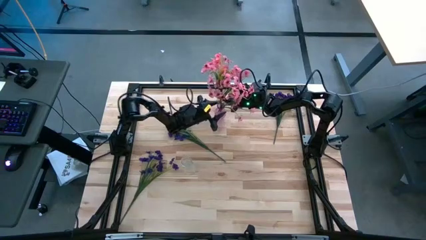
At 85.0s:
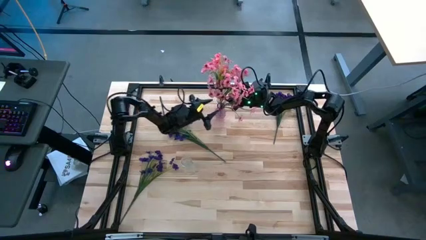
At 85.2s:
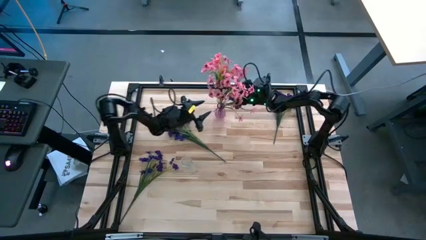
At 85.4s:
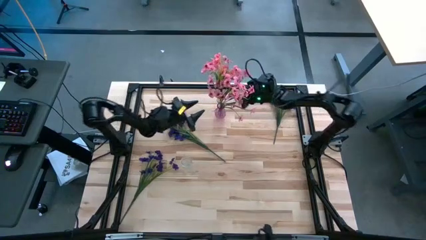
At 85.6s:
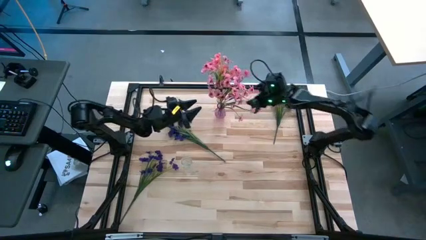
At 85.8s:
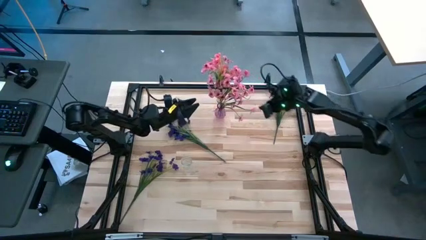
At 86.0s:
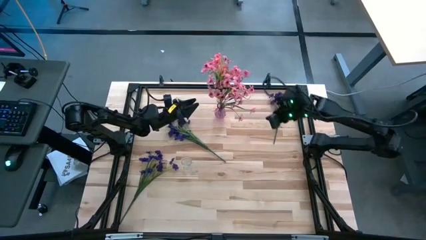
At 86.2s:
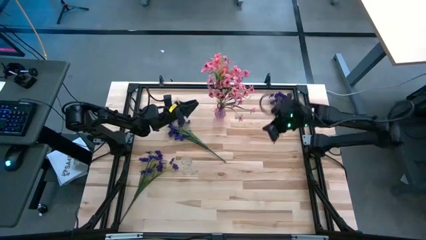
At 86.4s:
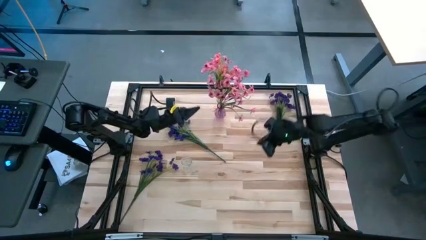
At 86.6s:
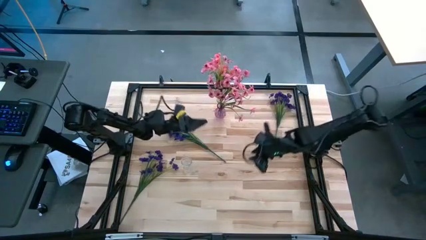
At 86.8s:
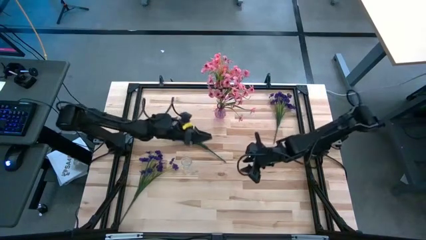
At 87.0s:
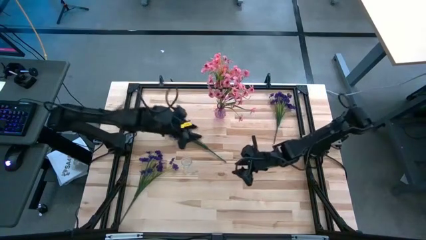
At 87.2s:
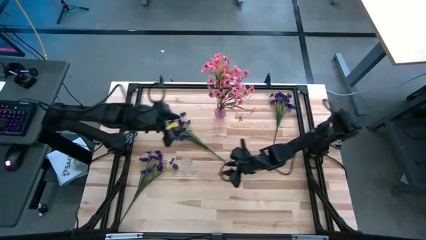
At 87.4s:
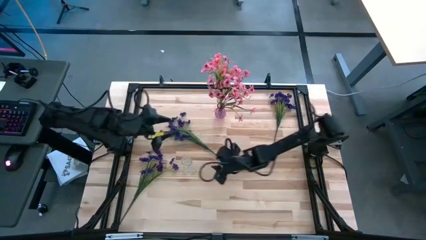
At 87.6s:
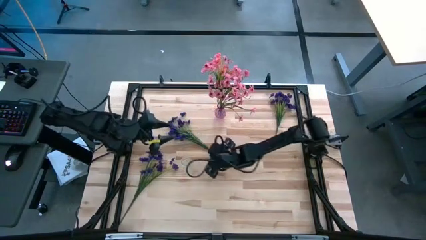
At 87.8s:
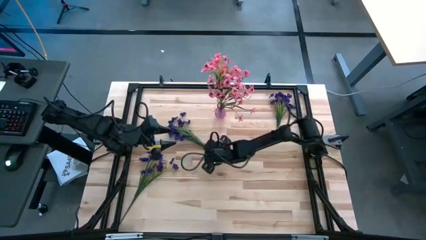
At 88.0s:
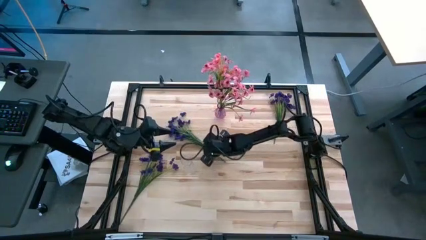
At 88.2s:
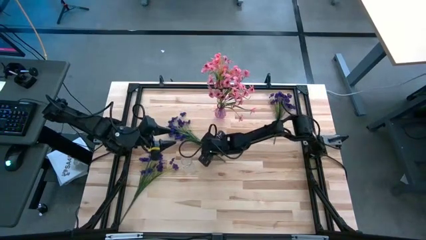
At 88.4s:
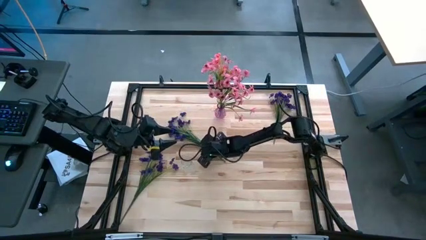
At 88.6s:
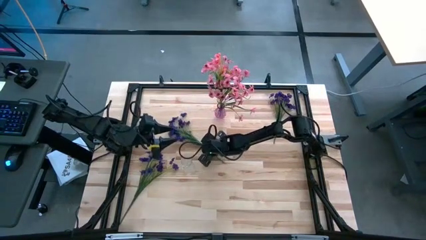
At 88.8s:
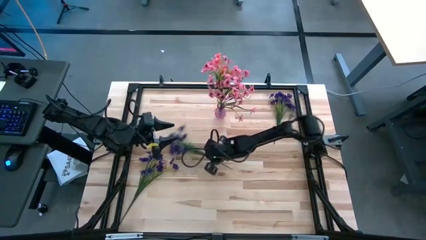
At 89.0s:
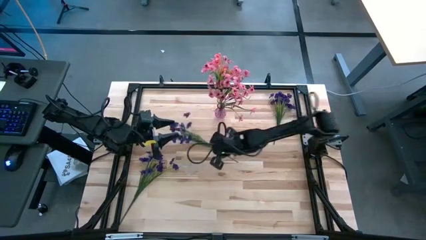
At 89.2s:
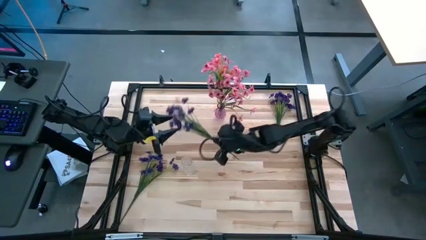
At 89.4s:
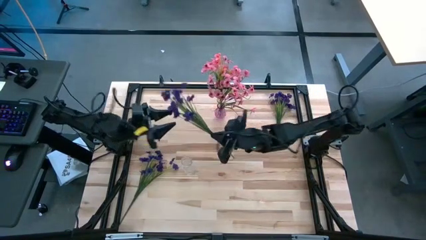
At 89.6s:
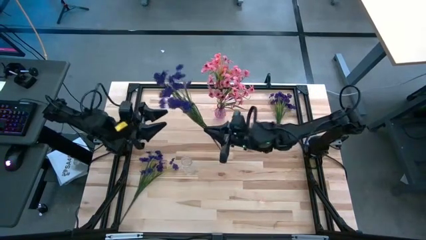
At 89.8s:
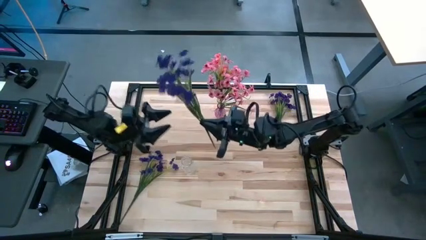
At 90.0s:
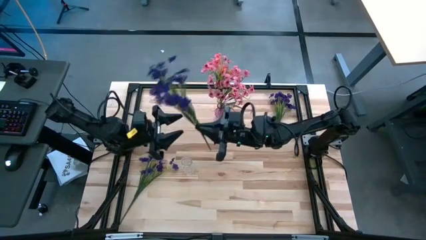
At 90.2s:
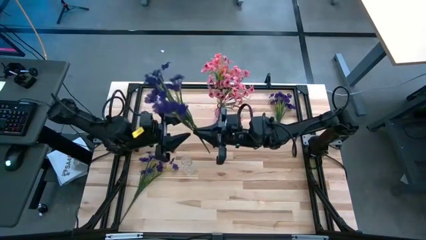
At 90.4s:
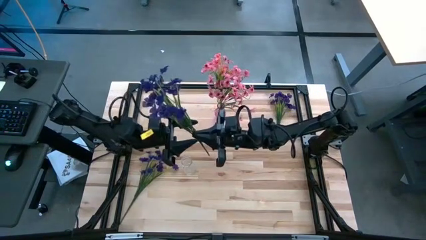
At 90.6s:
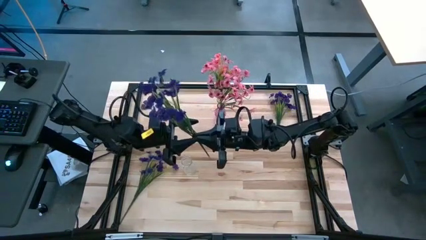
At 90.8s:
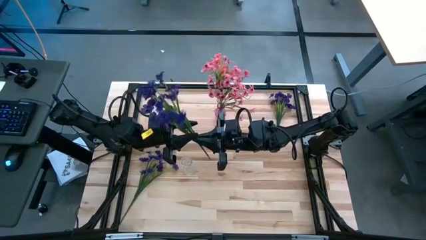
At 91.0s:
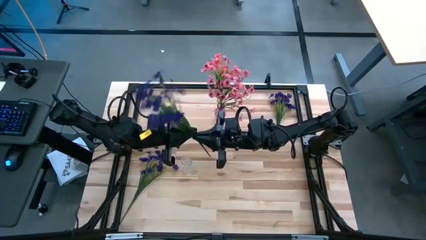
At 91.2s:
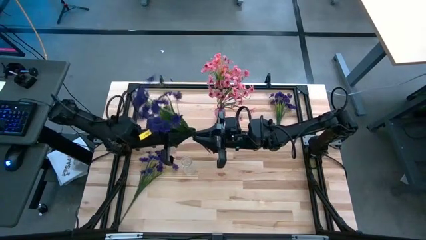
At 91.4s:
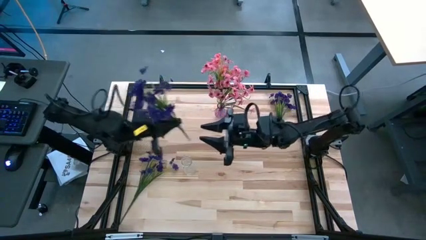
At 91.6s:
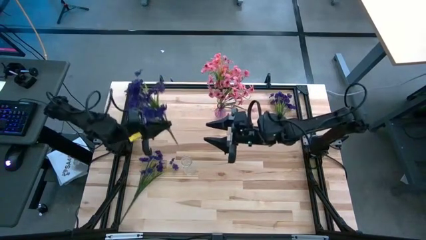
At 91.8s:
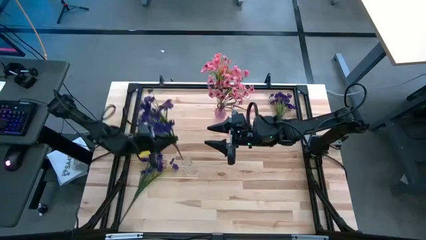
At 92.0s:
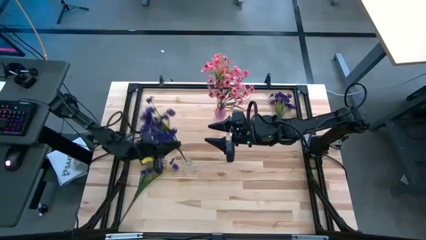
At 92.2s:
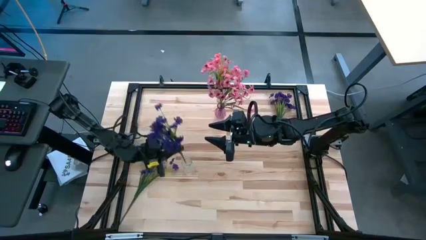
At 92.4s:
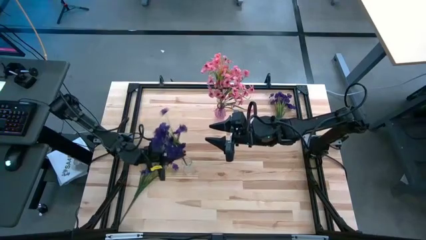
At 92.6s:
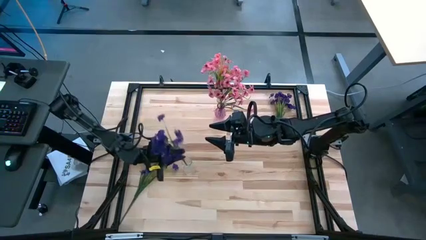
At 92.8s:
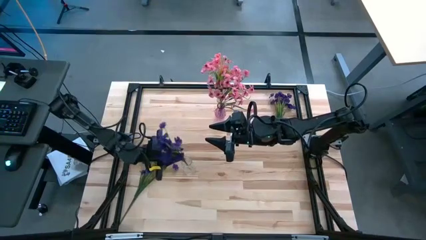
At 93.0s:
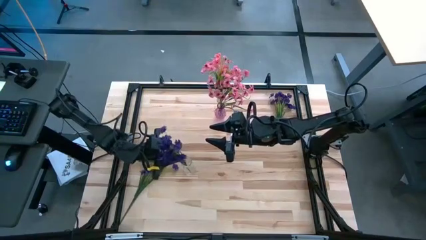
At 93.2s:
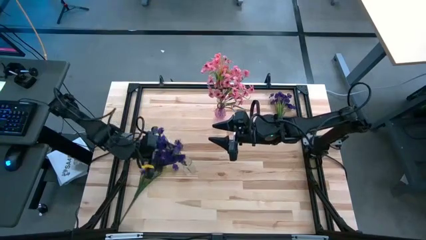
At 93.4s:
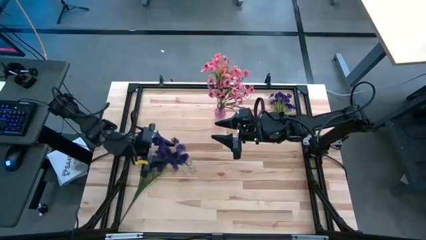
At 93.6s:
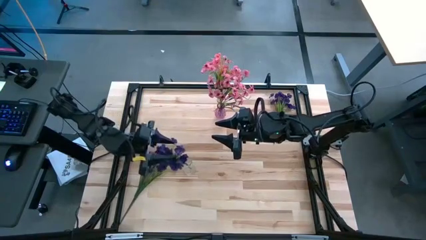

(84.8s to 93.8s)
Task: Sort flowers into vase by color
Put the middle purple flowers into the transparent vase

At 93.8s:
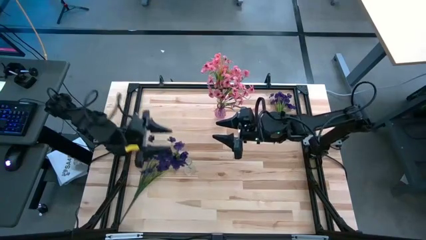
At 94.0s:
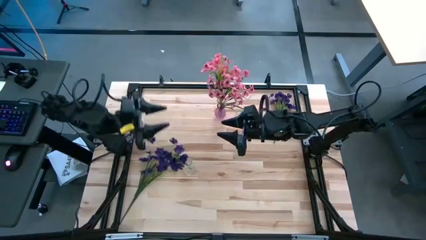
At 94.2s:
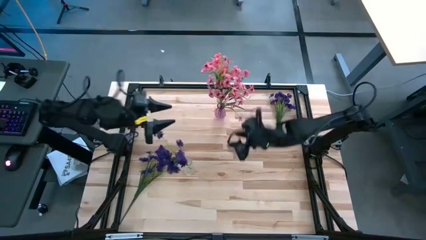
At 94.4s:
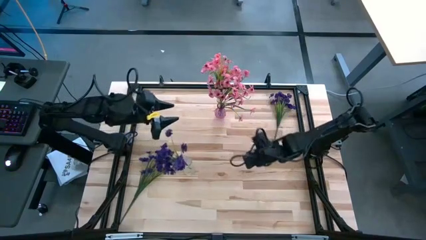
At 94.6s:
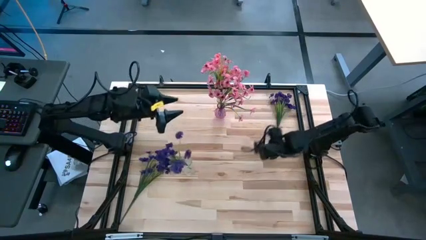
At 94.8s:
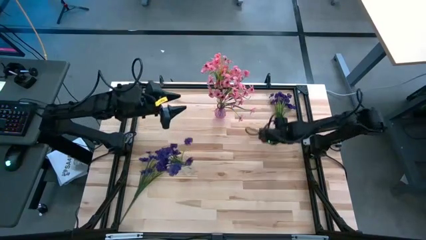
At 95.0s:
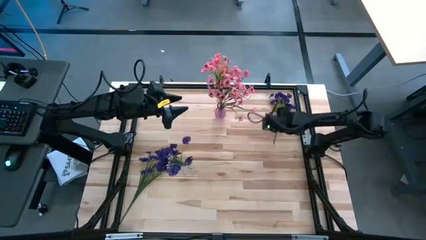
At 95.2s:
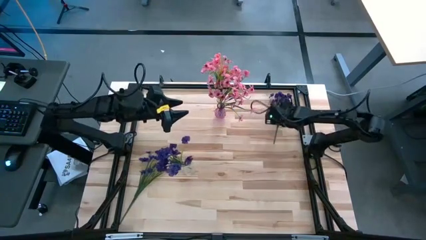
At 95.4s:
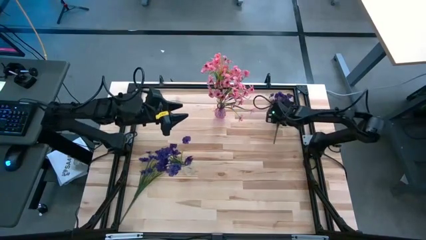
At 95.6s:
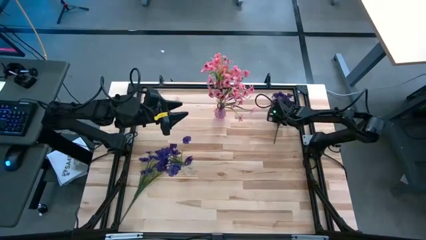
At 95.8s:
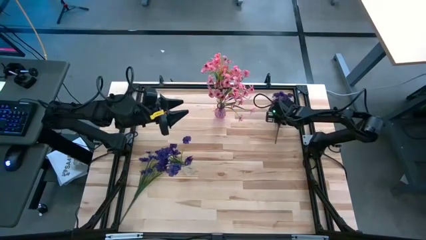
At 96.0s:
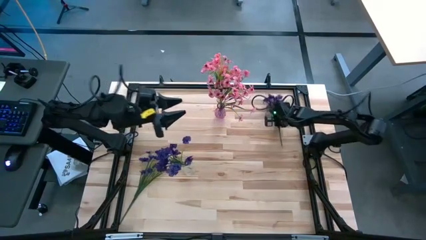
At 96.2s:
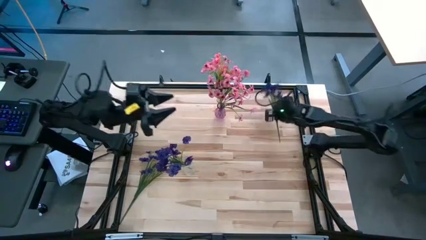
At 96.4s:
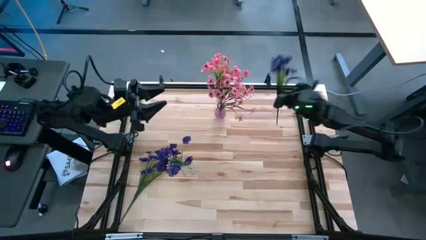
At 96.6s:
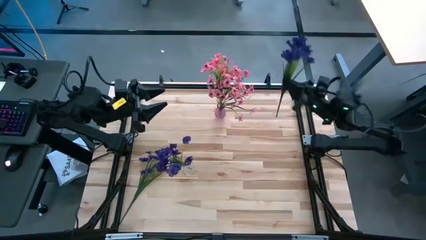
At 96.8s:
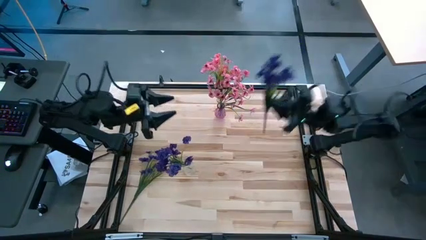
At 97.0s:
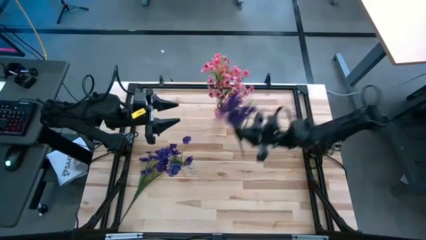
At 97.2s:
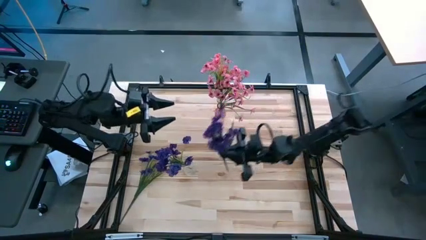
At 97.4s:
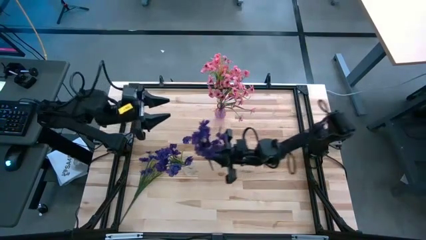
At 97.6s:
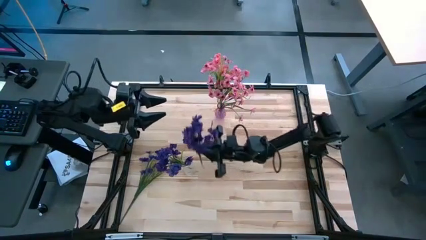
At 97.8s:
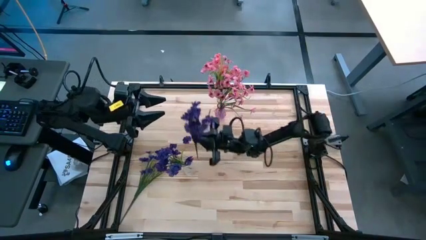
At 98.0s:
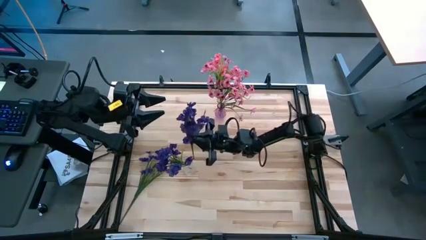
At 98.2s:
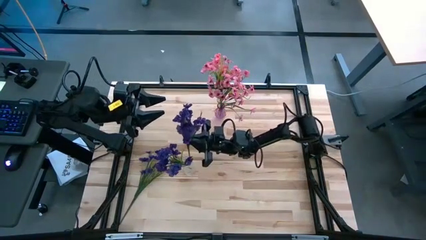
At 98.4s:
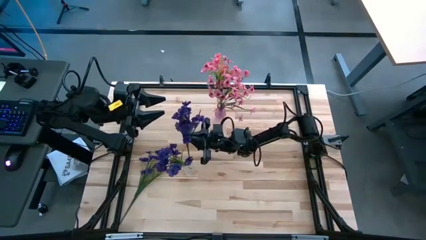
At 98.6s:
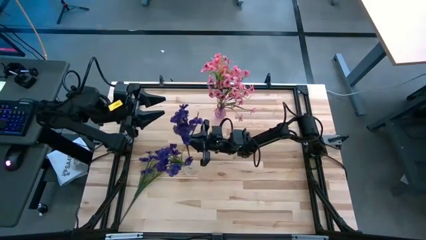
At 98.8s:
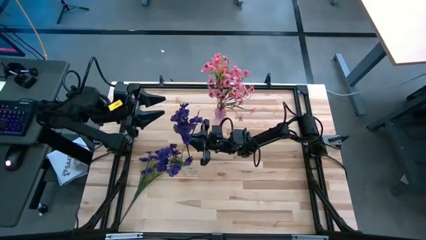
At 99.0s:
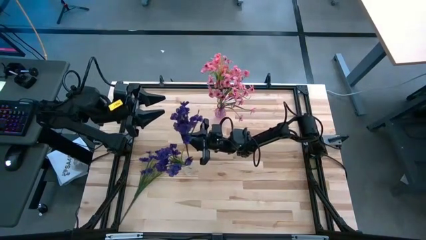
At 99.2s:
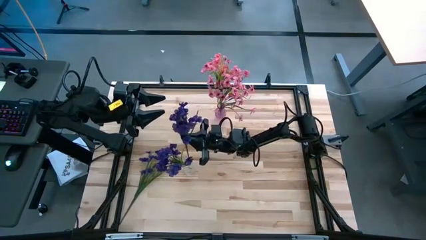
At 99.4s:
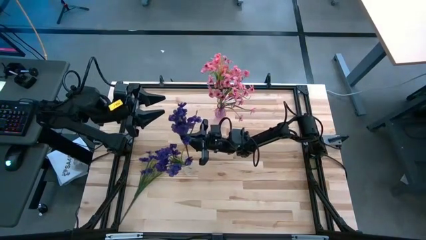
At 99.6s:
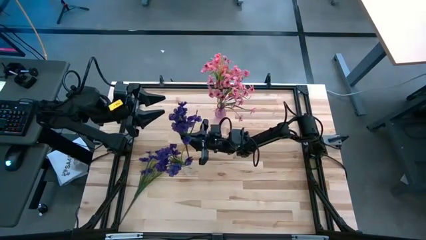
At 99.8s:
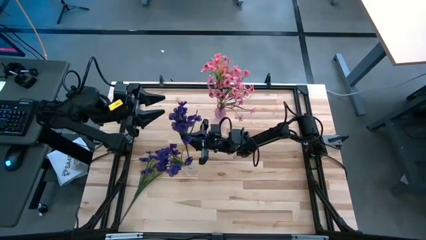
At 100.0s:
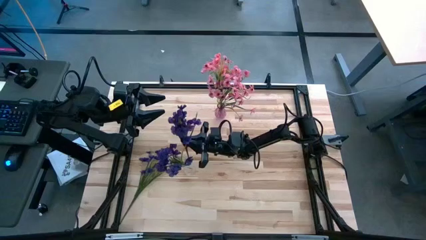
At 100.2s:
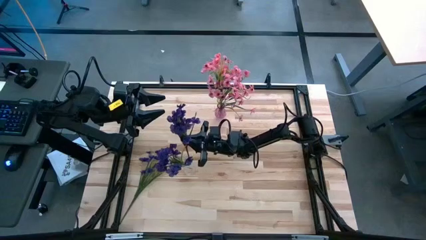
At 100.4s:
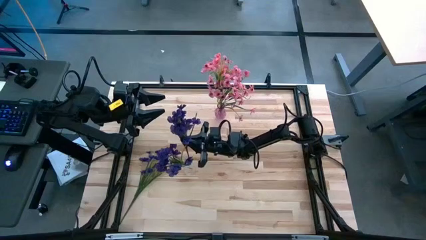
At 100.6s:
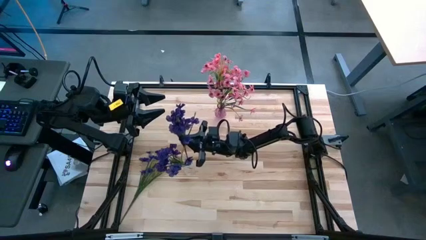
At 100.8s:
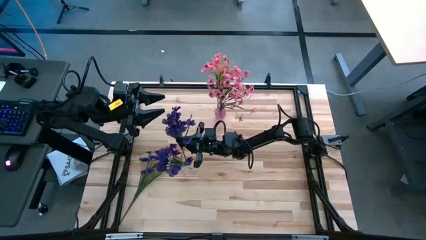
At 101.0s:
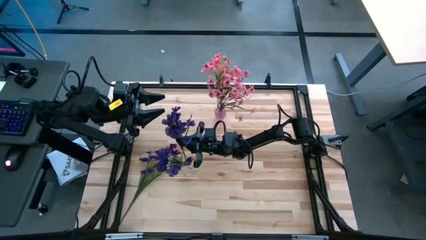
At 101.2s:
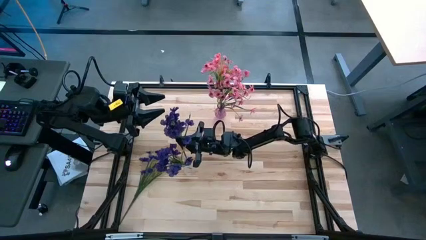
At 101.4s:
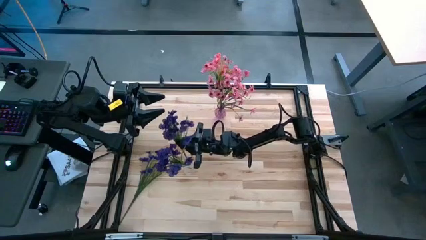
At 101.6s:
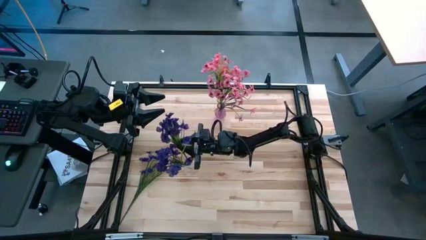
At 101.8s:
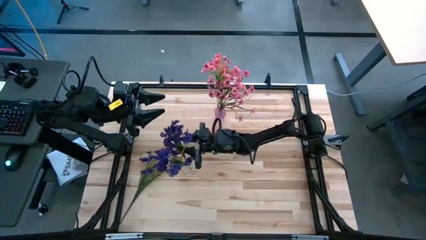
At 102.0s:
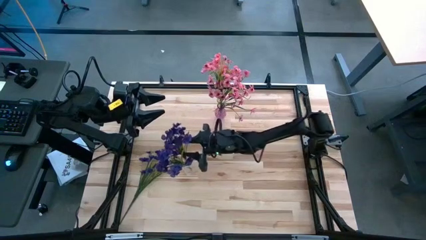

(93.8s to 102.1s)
Put the top purple flowers into the transparent vase
